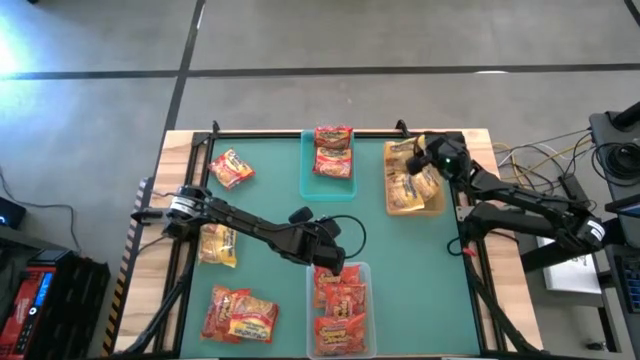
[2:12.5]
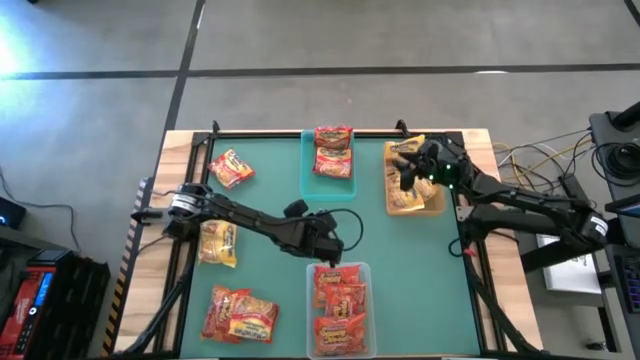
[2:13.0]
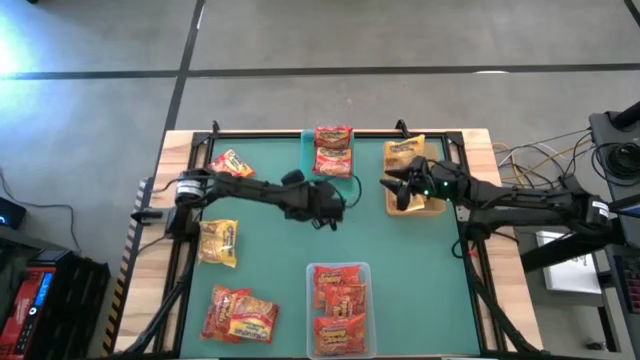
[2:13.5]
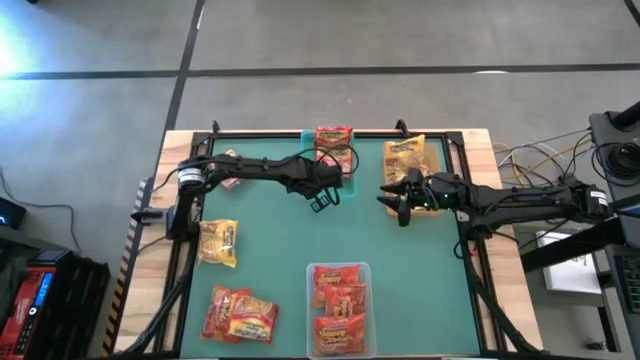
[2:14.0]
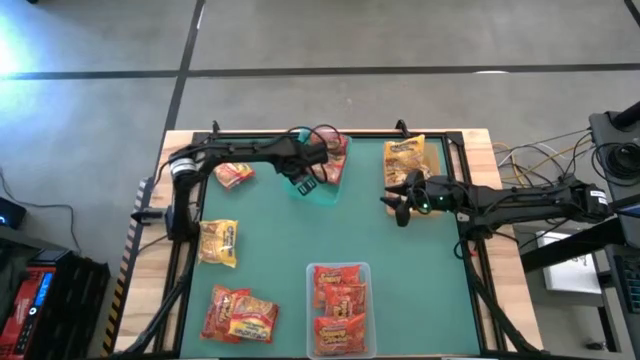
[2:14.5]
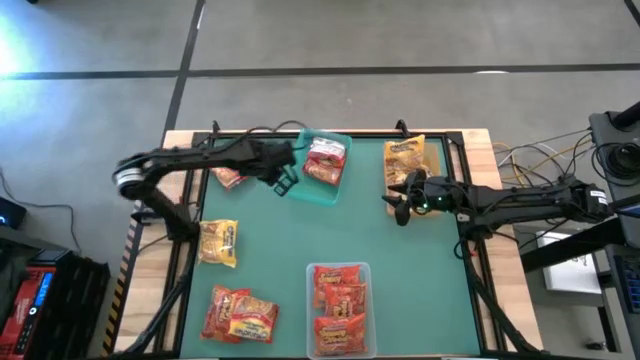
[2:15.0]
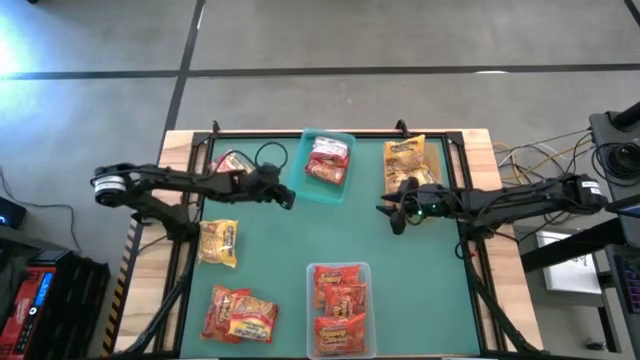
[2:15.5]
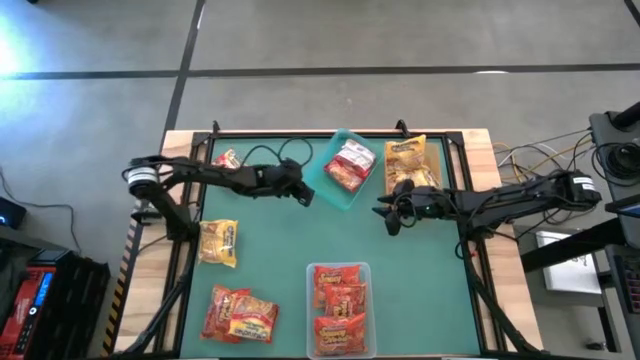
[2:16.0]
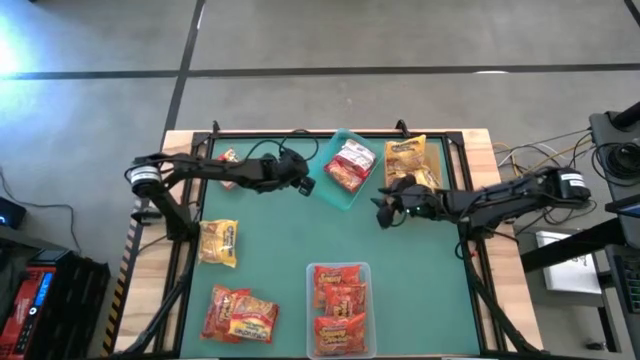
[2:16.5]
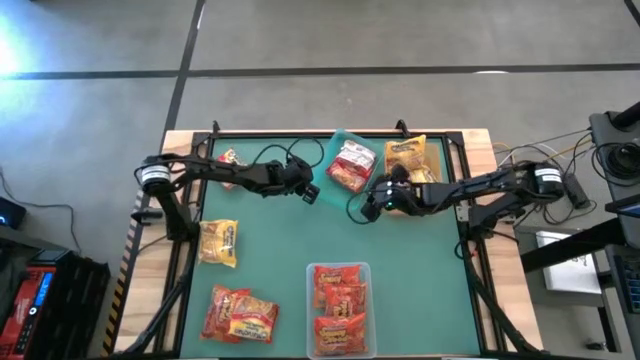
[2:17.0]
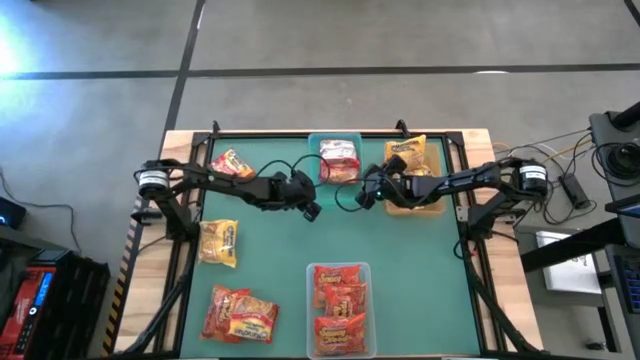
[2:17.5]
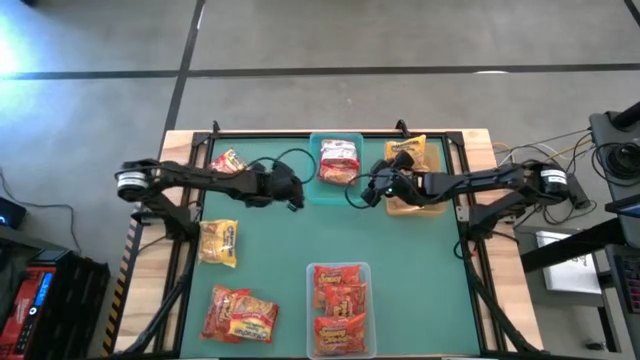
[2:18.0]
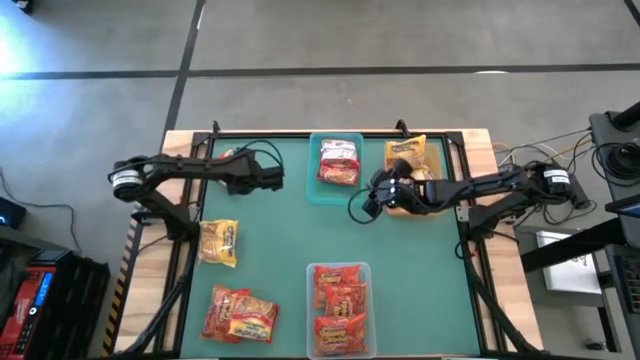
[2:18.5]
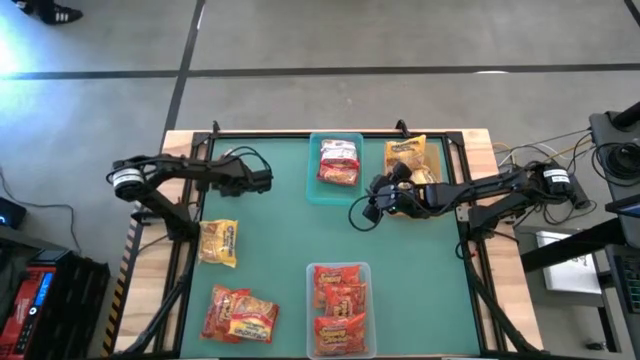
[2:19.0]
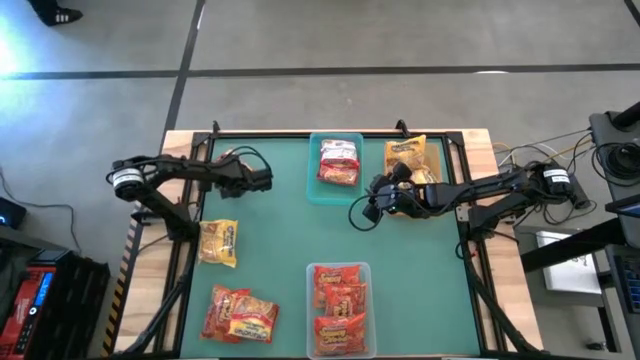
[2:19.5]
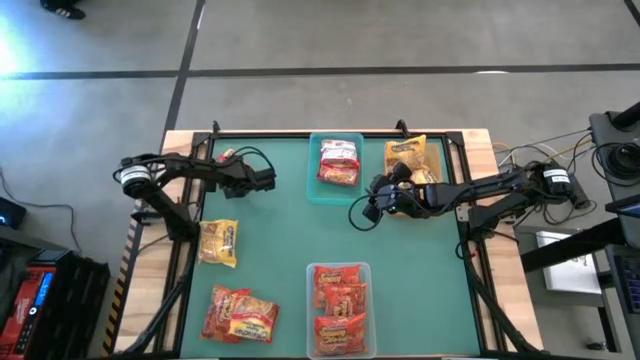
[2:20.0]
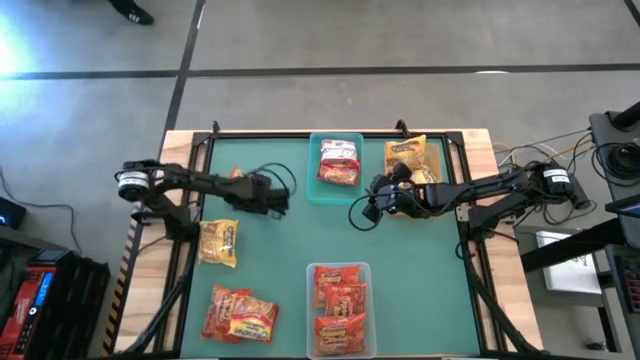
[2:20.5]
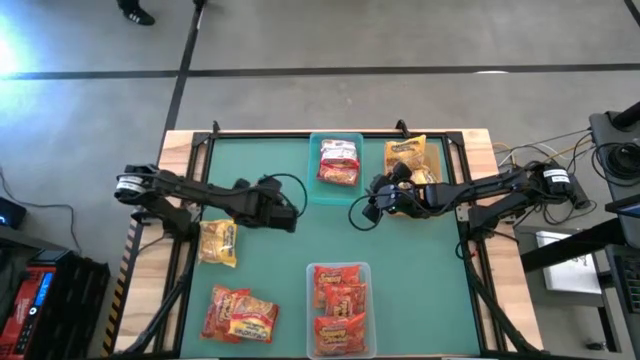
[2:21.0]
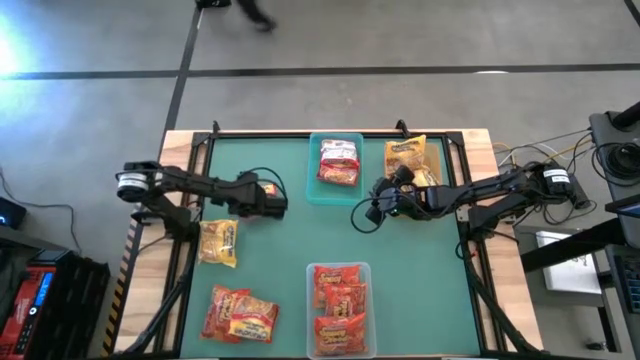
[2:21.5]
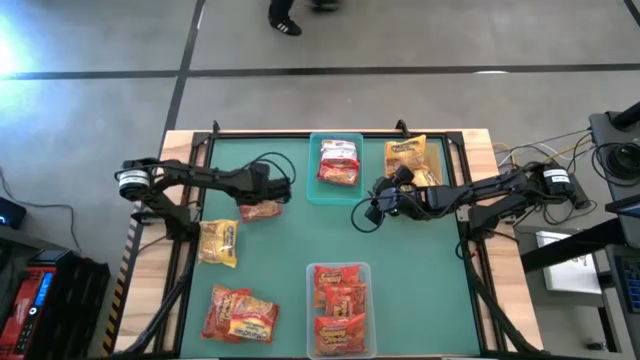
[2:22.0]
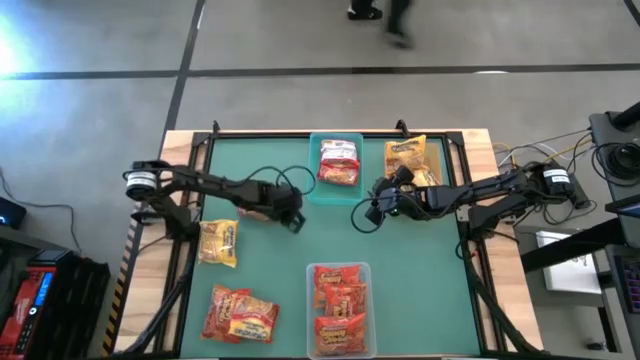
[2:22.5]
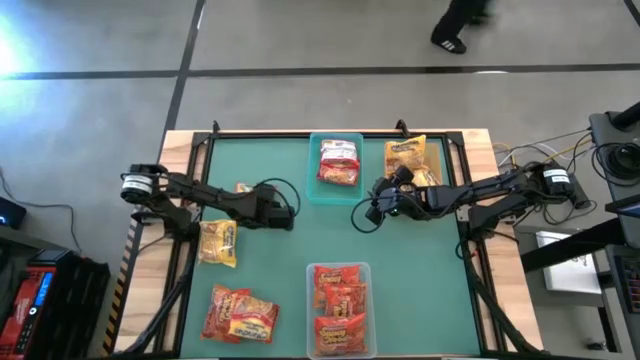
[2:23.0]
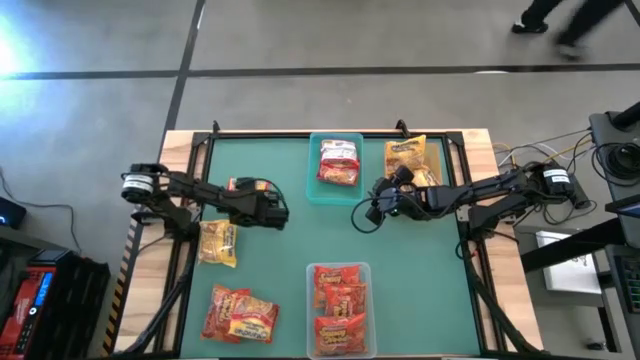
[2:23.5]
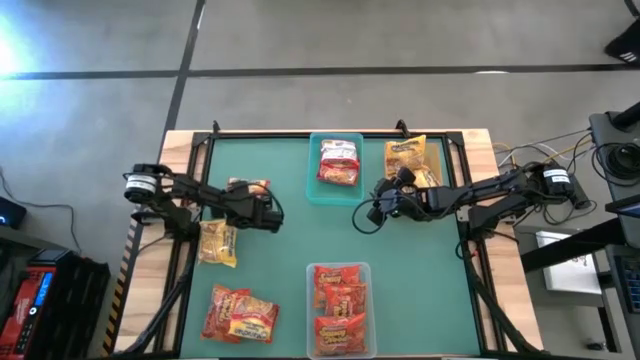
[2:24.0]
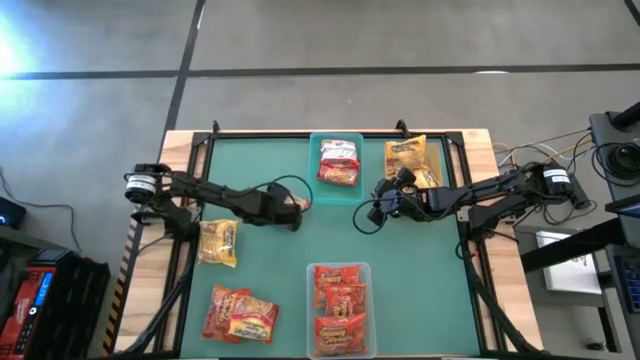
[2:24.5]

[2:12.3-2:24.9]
Task: Sort Maruchan noodles
Put the top red noodle pack into the transparent green bin

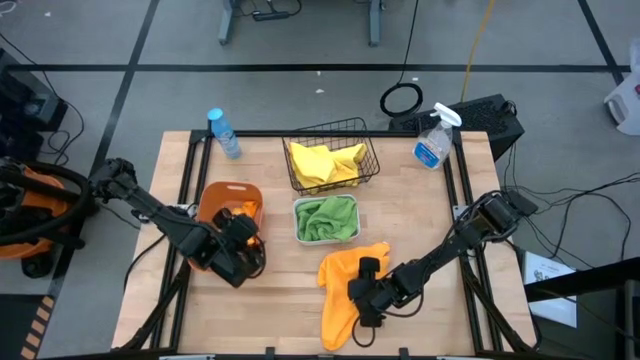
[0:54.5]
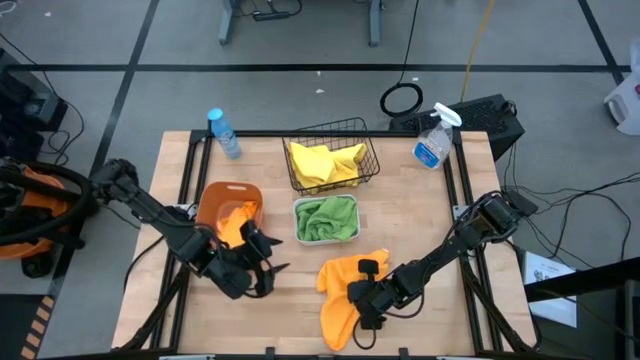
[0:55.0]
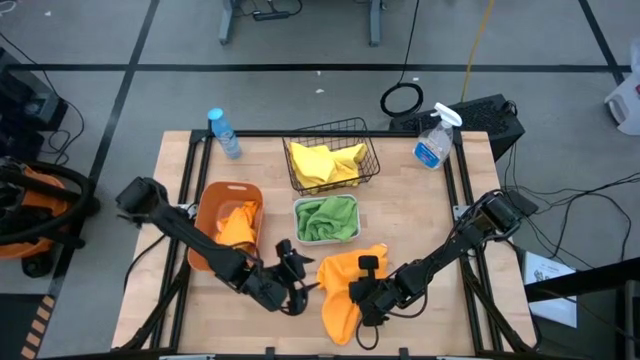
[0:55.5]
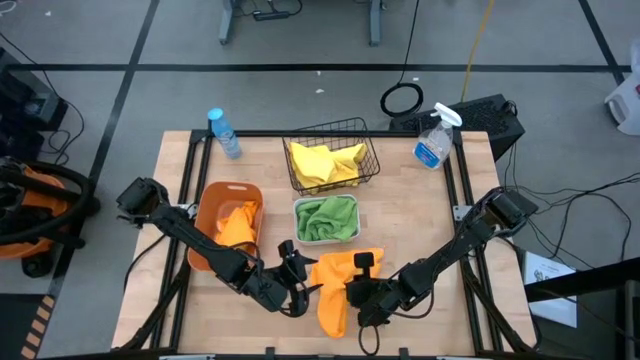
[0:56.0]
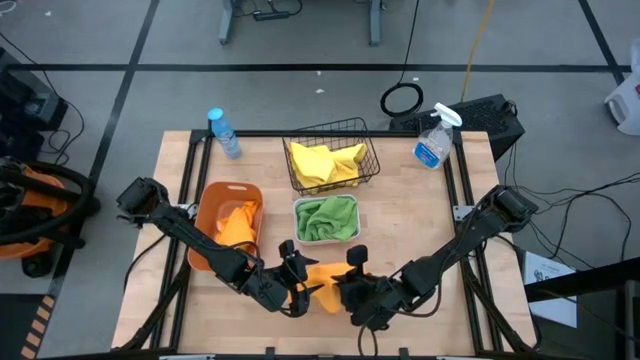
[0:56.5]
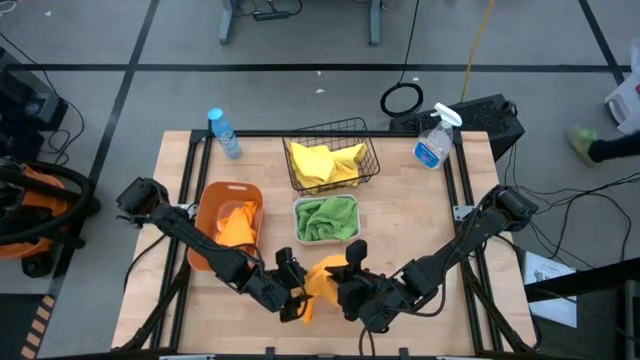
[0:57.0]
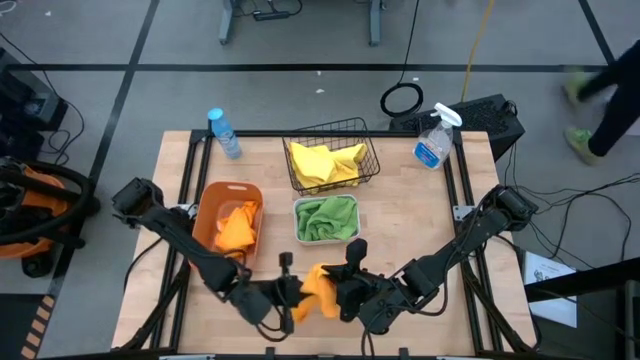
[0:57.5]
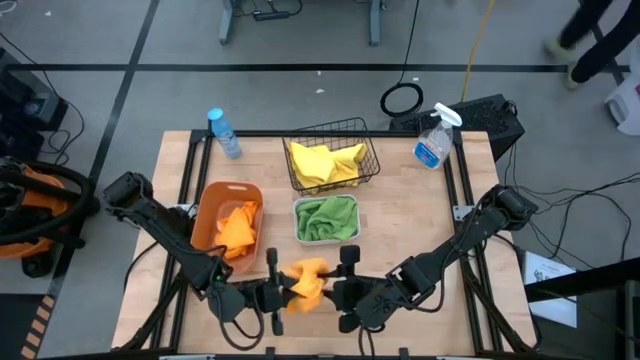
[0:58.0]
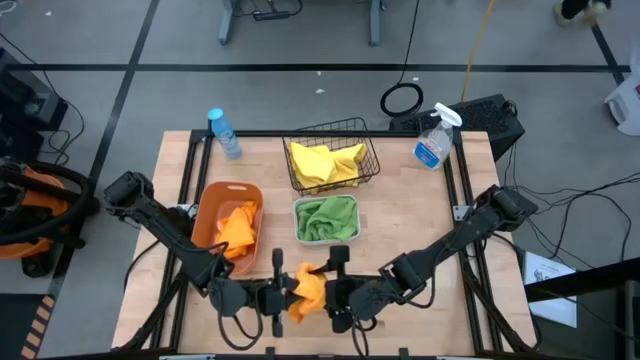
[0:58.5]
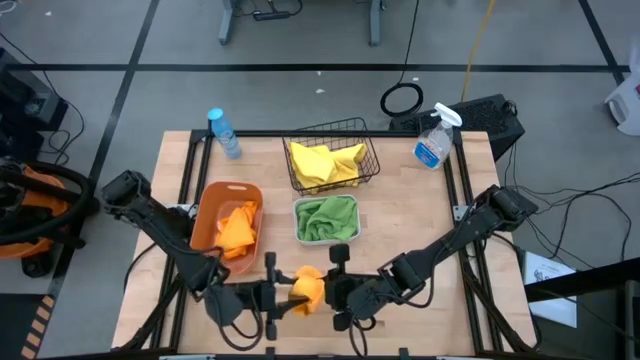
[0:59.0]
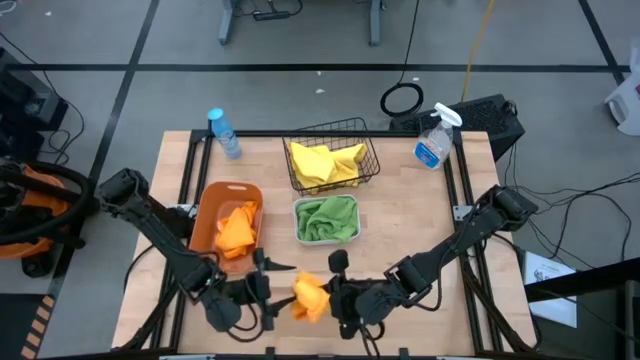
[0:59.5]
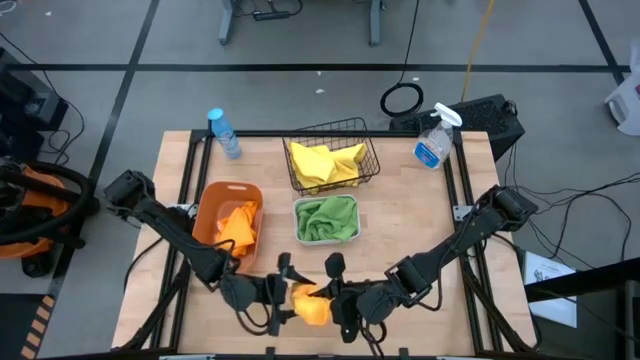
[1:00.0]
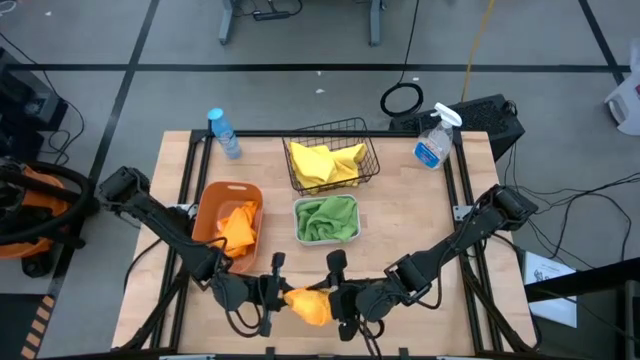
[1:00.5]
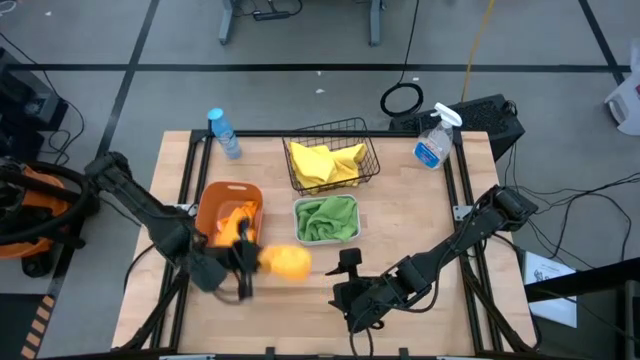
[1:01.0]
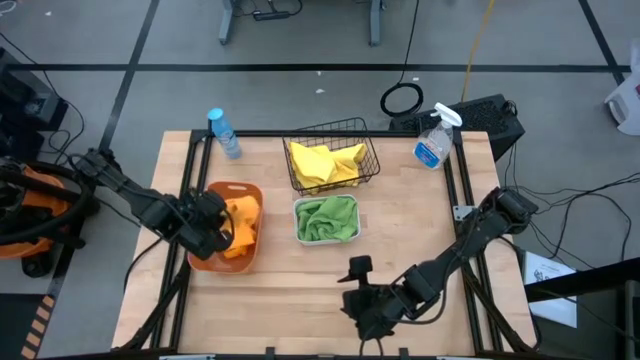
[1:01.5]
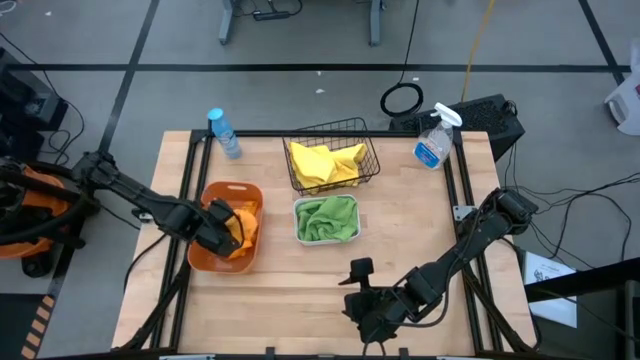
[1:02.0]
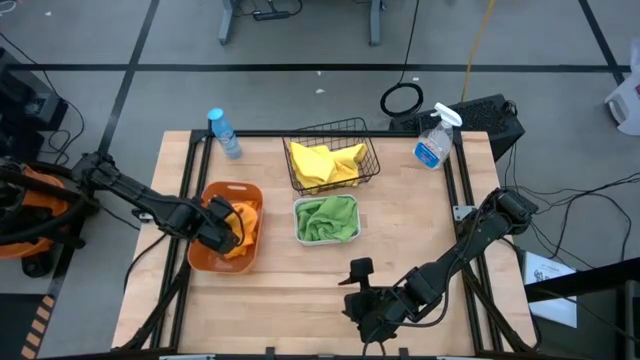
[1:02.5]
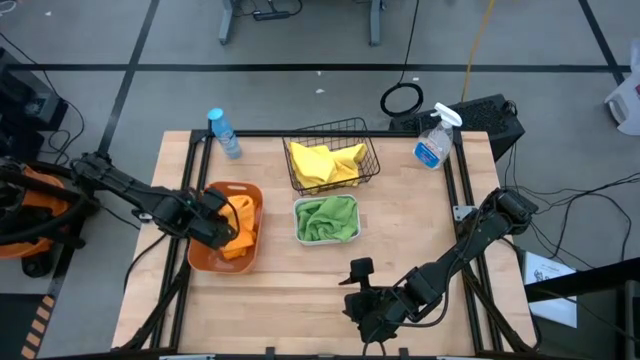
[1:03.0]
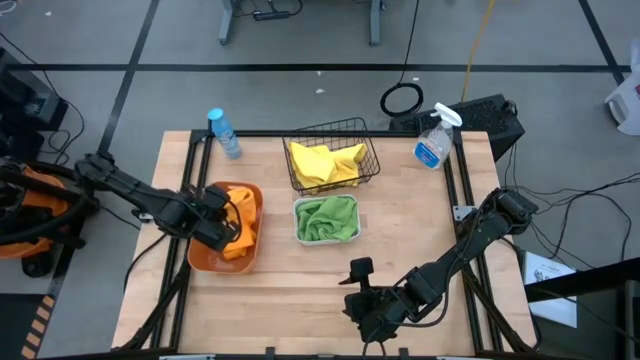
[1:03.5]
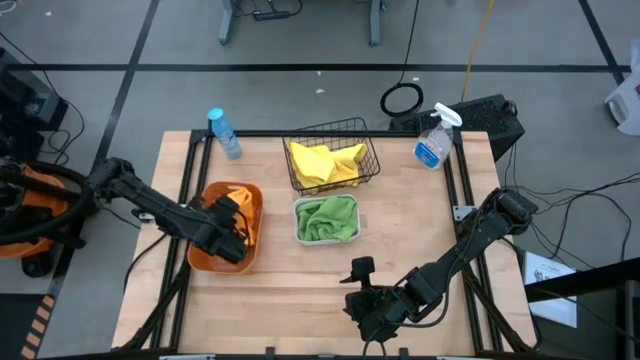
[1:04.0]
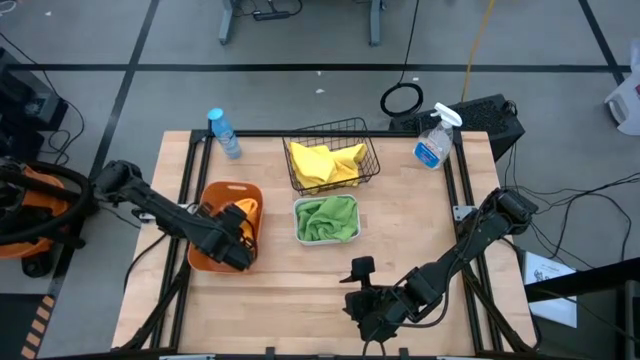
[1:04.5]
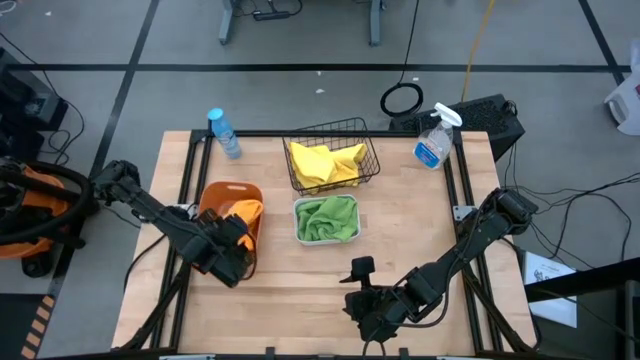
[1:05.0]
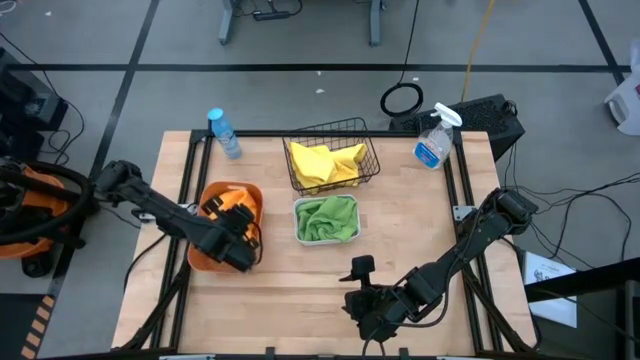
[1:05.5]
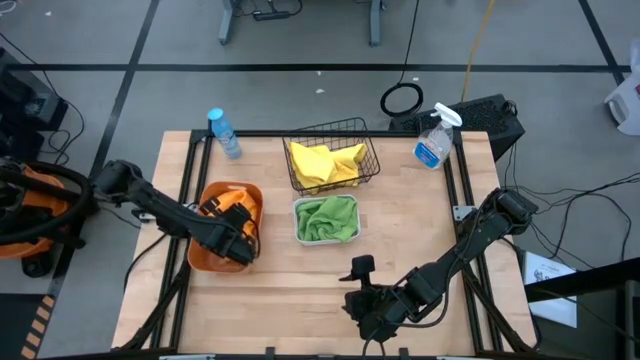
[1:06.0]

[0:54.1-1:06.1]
Task: Sort microfiber towel by color & place in baskets
Put the orange towel into the orange bin
